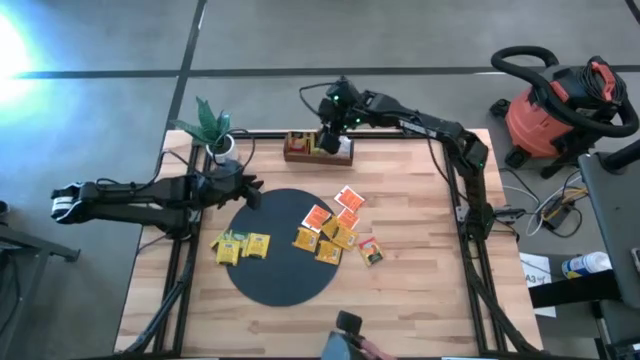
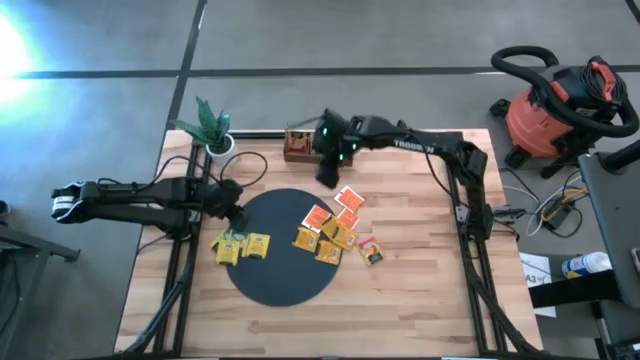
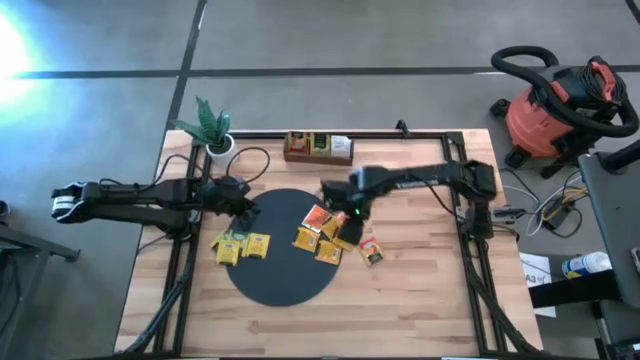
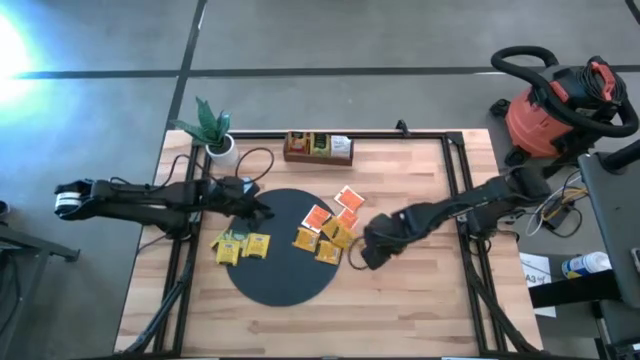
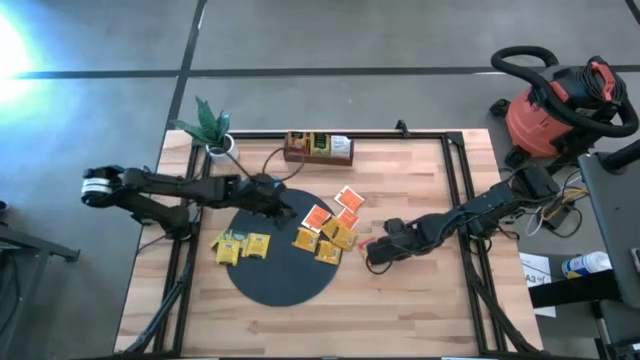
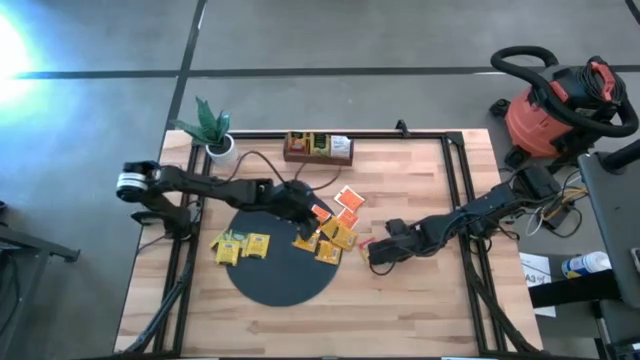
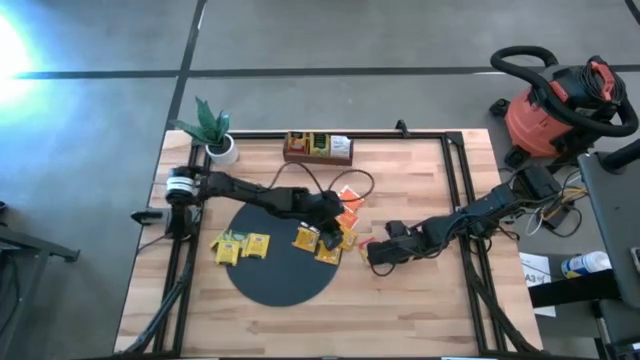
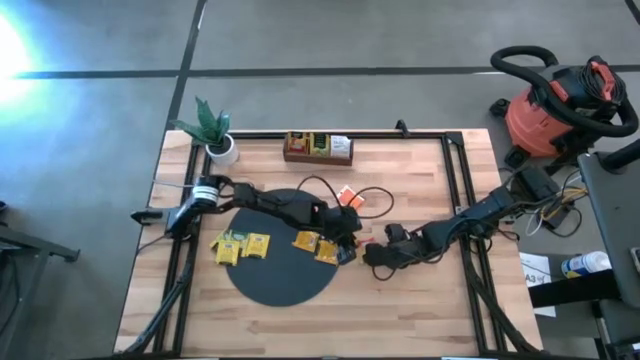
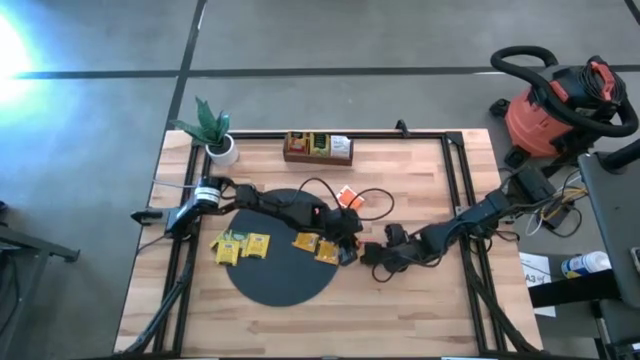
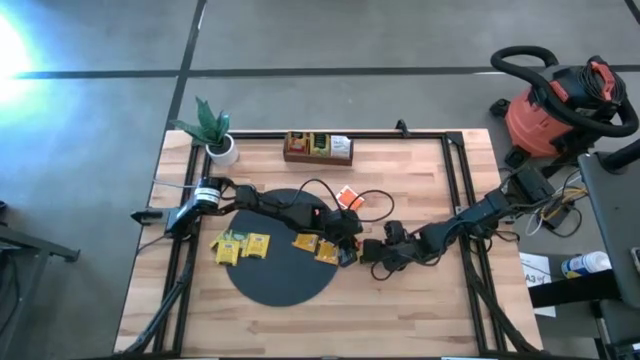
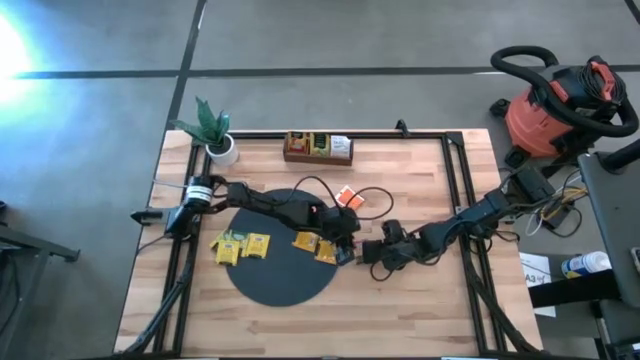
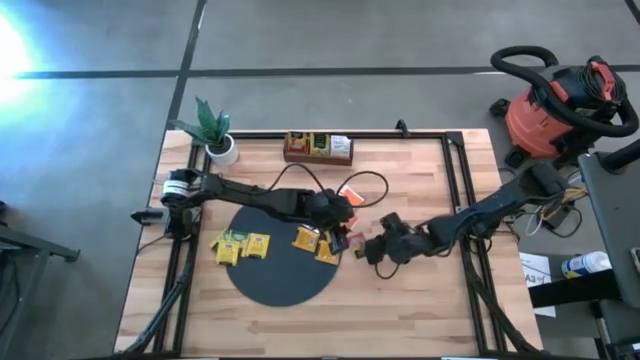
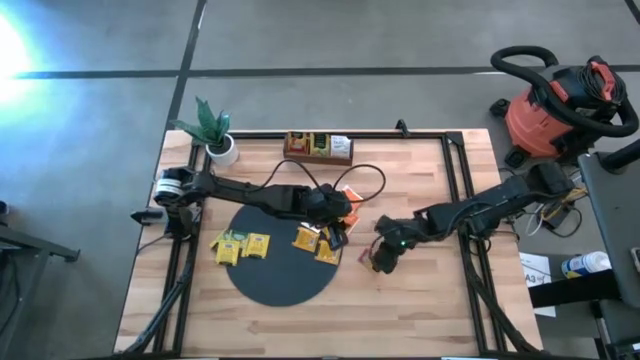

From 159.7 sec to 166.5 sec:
Task: Pick & Place Tea
Put the orange tea bag into the left section of the wooden organizer

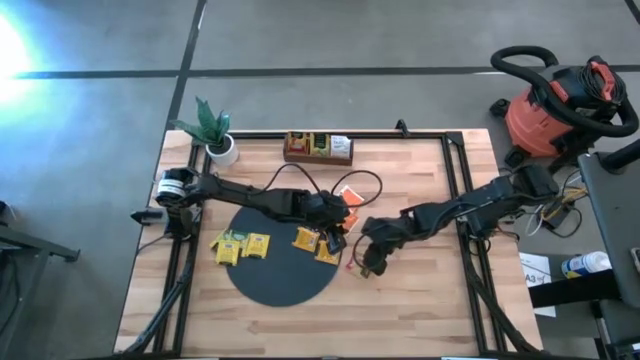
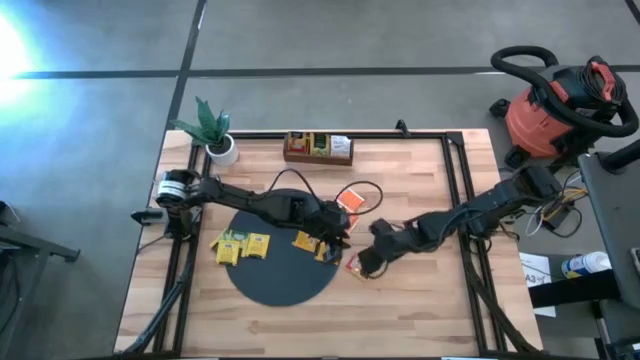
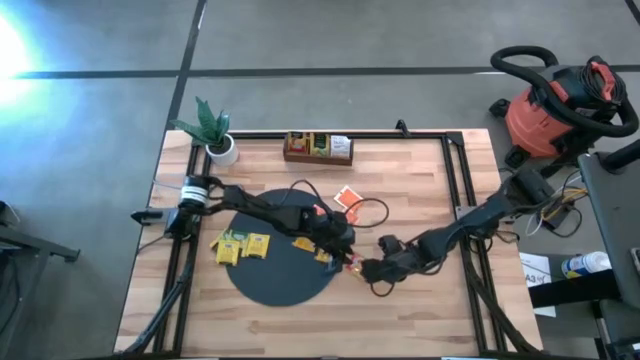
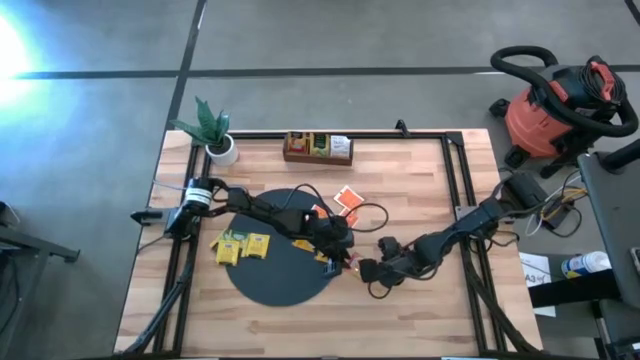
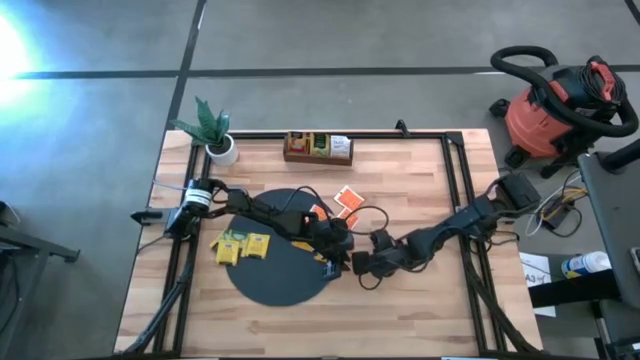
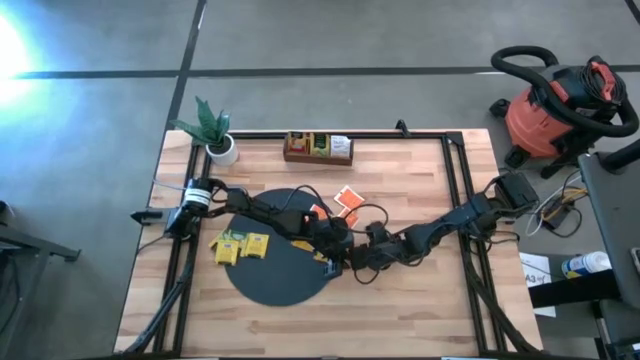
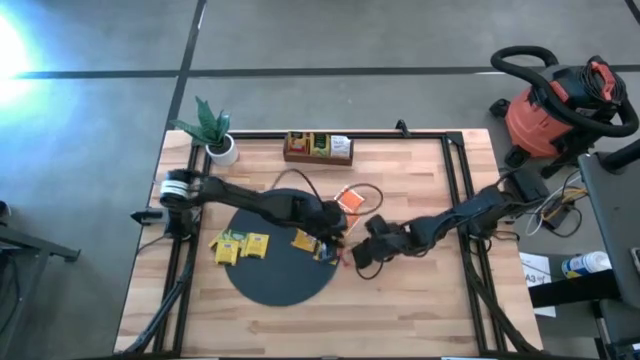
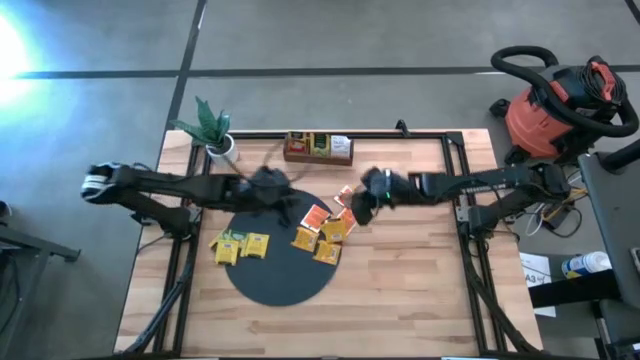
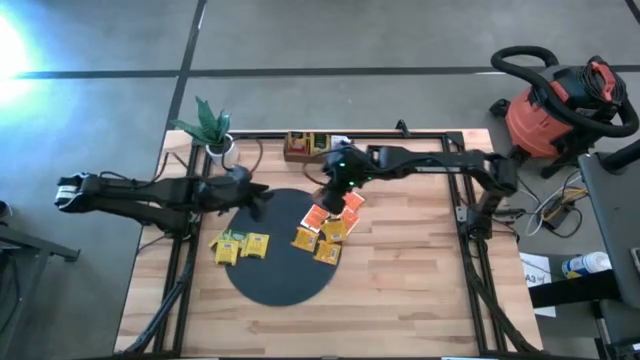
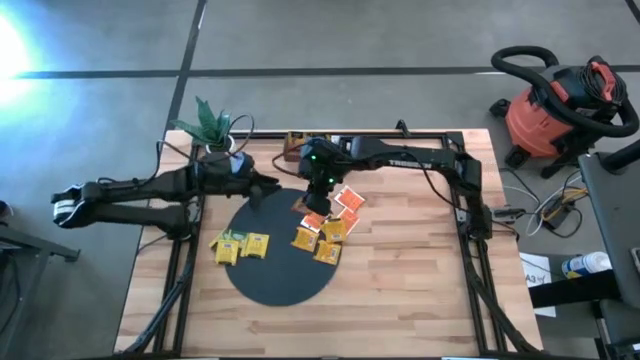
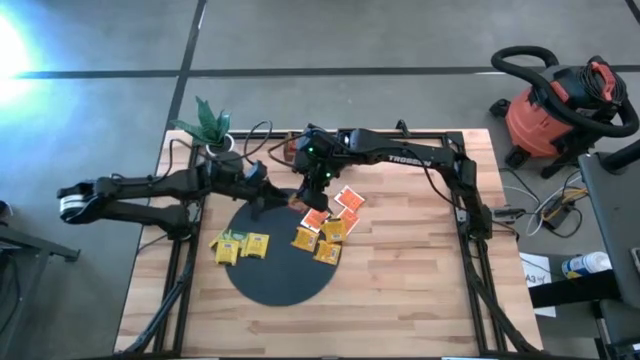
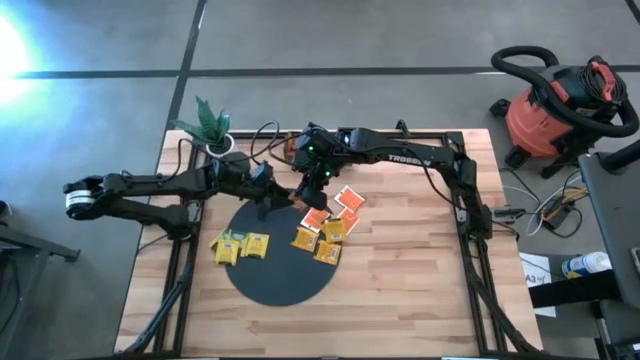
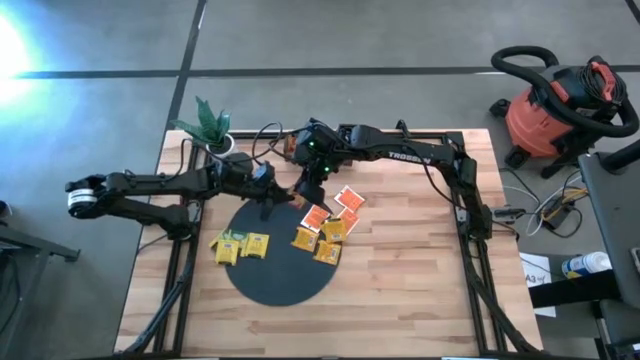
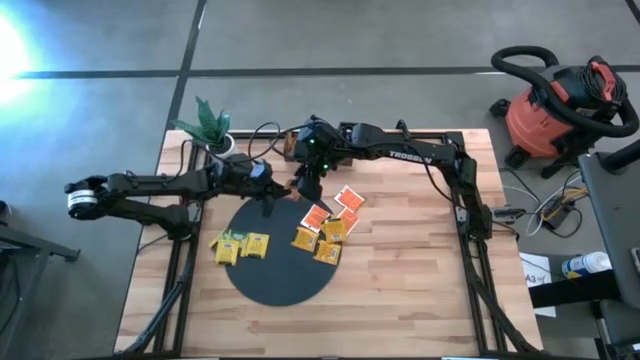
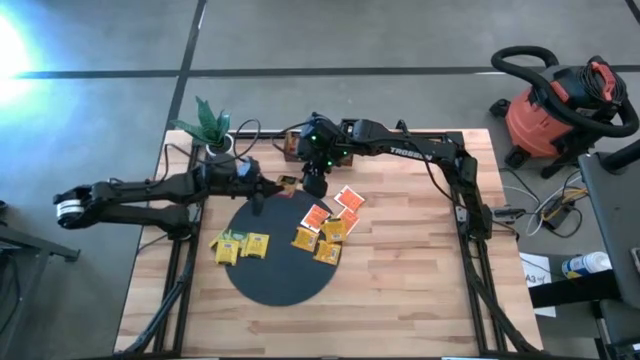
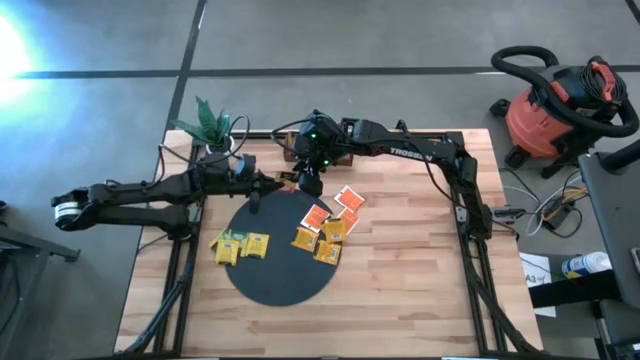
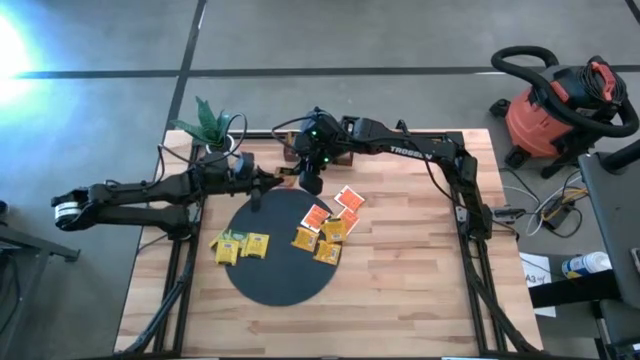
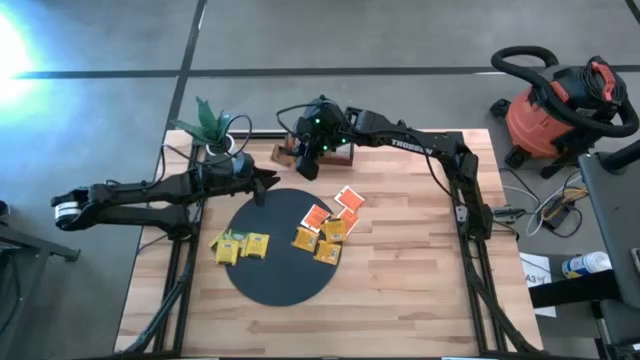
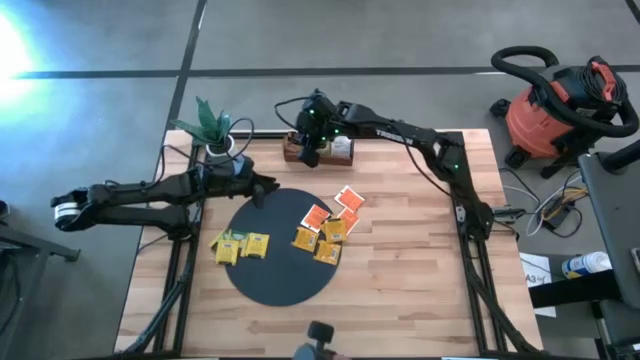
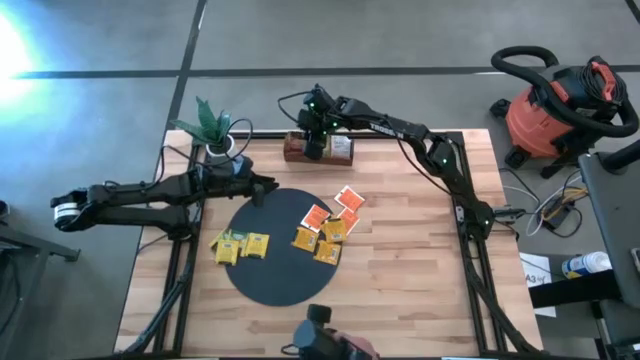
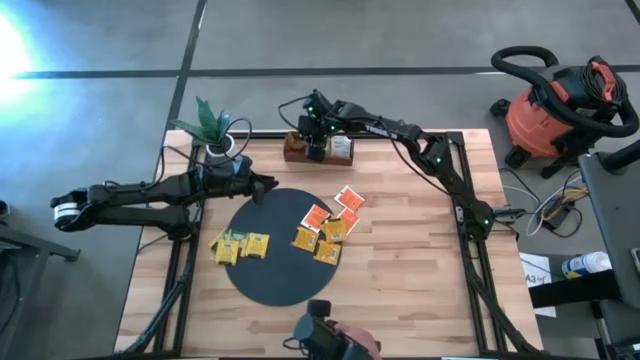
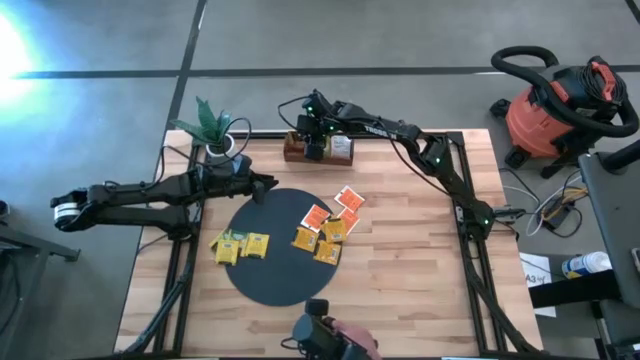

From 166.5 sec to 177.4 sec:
Put the orange tea bag into the left section of the wooden organizer

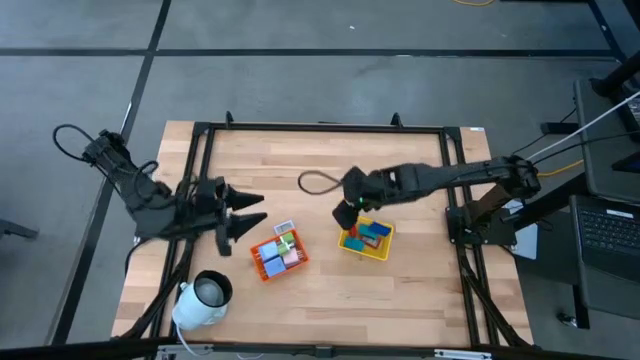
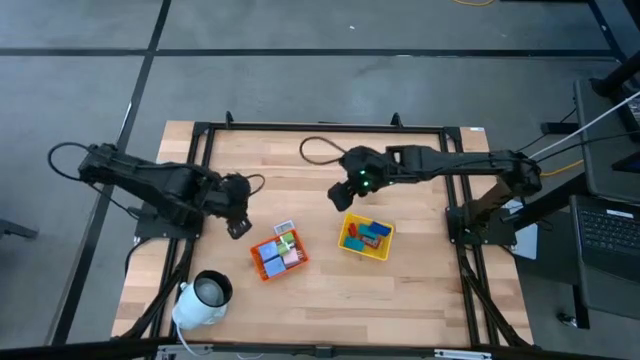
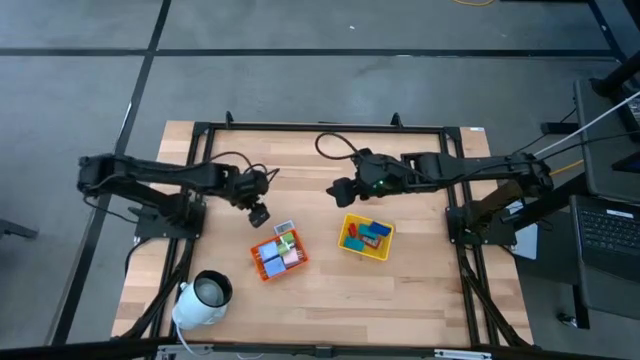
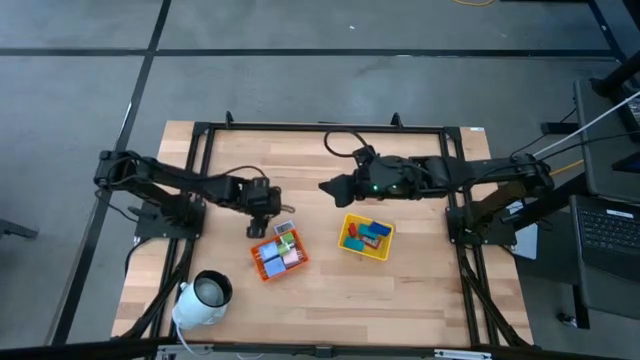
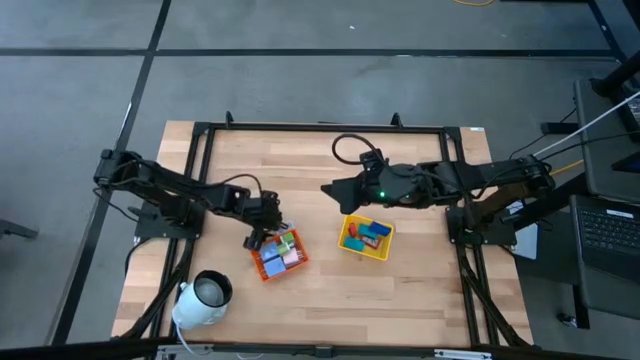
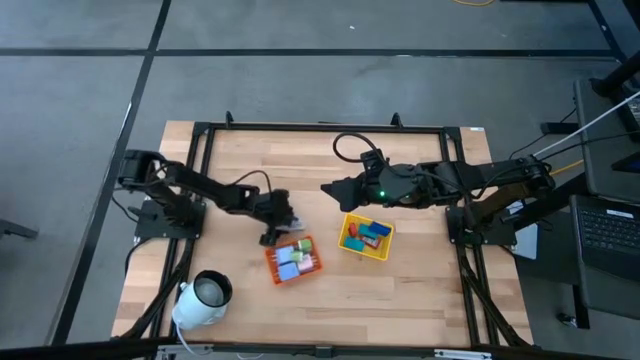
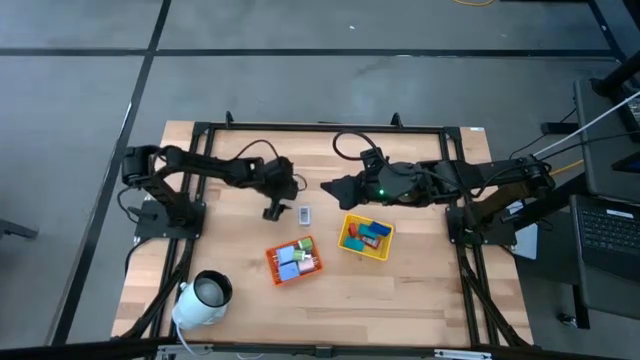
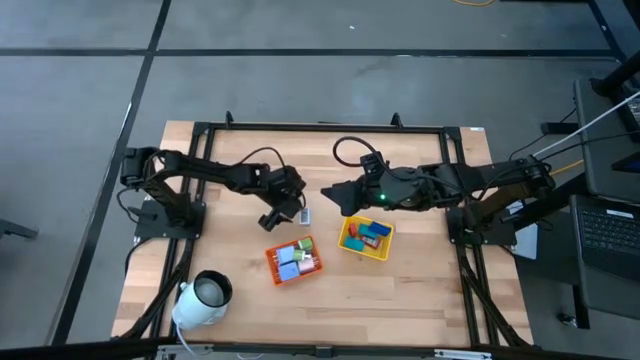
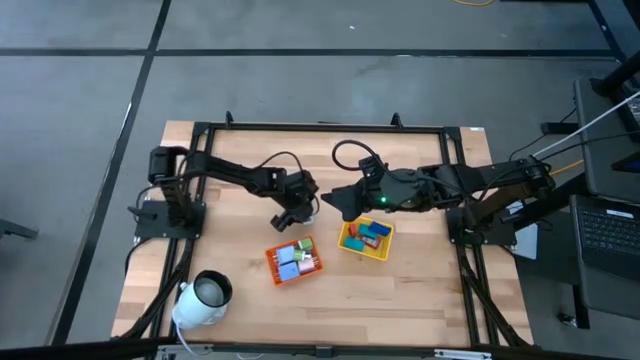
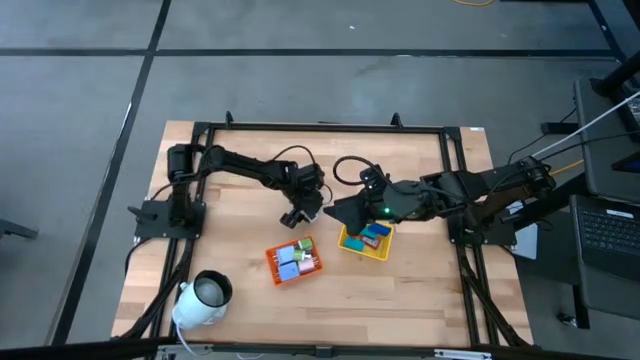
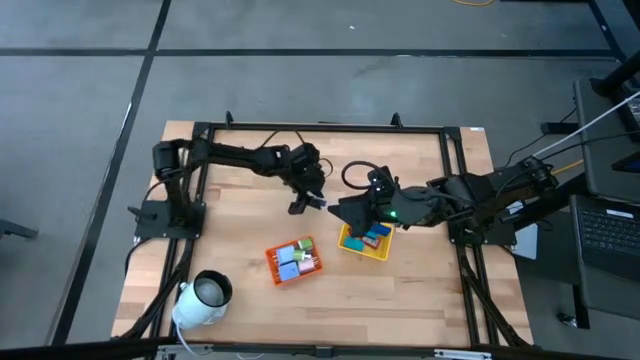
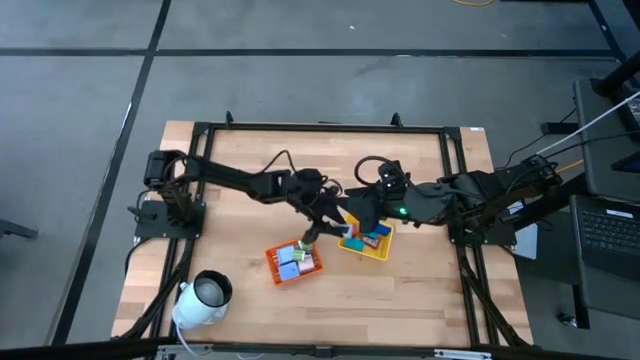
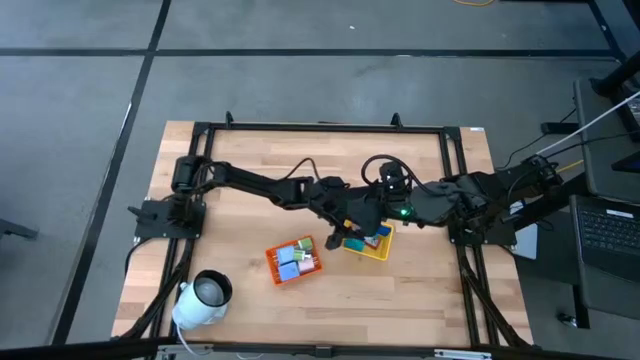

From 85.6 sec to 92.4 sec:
Task: Pick & Place Office items
Put the white digital clock into the yellow bin
